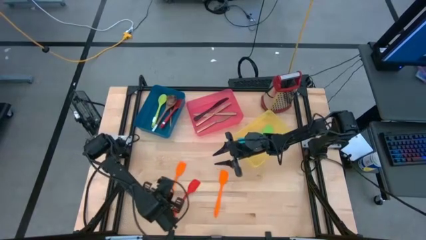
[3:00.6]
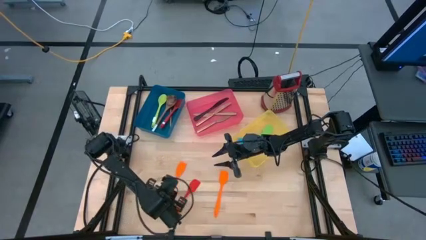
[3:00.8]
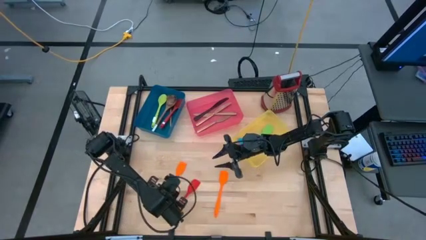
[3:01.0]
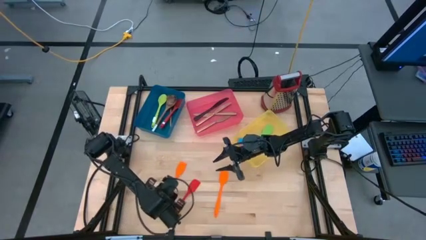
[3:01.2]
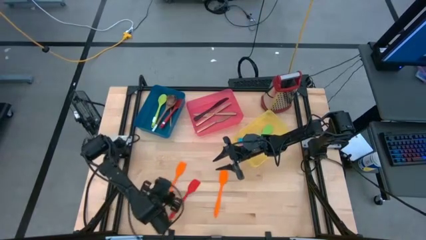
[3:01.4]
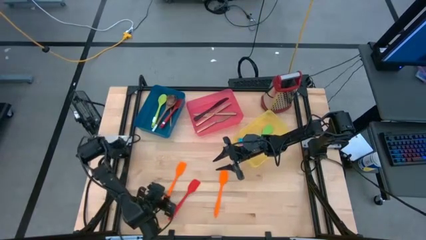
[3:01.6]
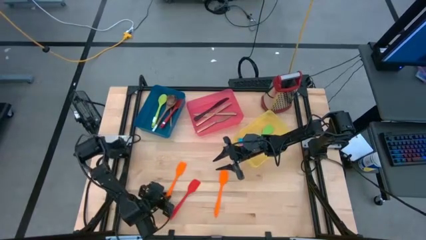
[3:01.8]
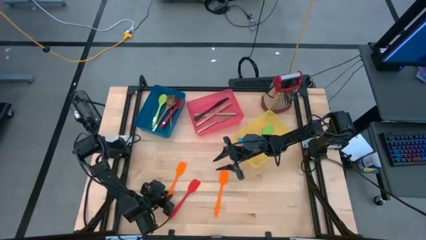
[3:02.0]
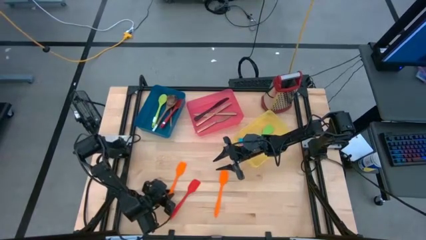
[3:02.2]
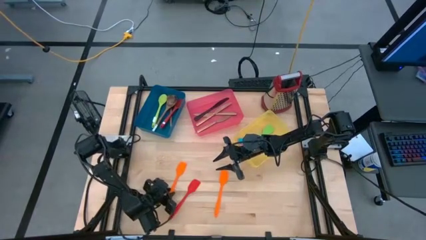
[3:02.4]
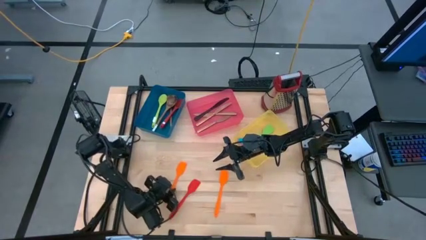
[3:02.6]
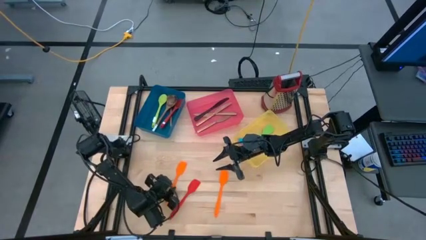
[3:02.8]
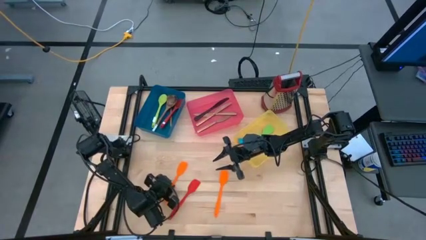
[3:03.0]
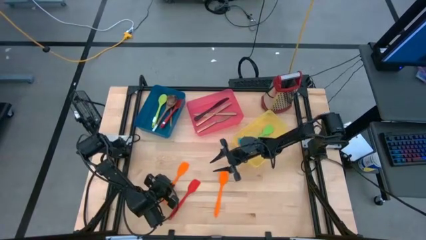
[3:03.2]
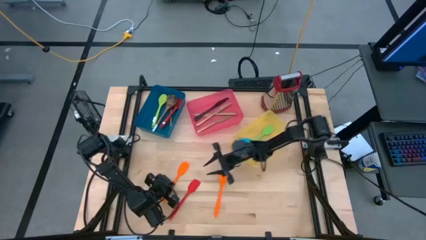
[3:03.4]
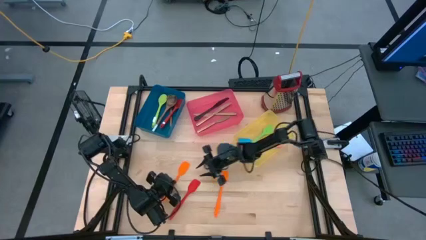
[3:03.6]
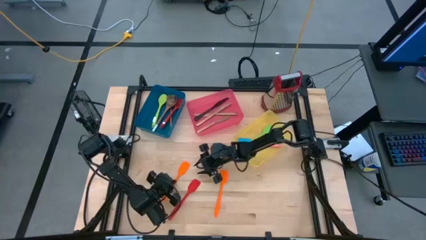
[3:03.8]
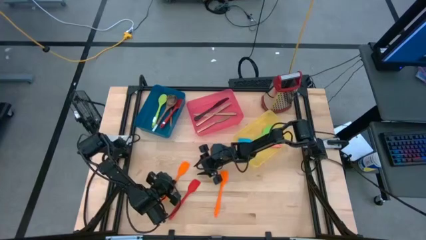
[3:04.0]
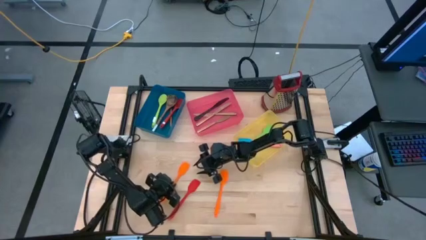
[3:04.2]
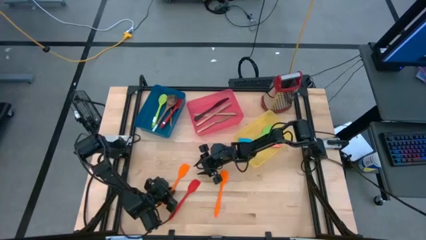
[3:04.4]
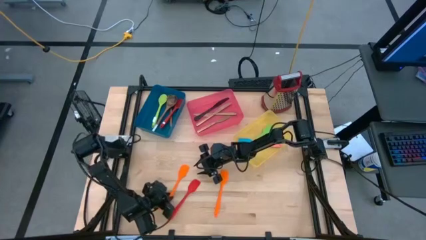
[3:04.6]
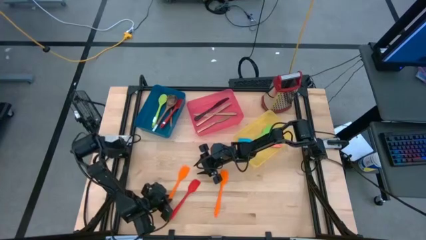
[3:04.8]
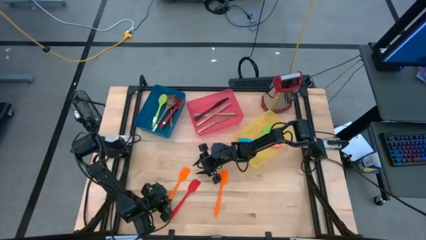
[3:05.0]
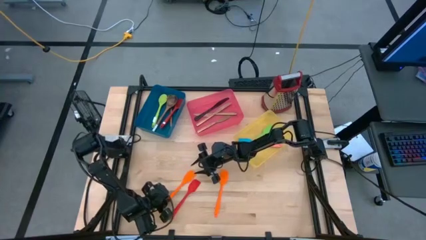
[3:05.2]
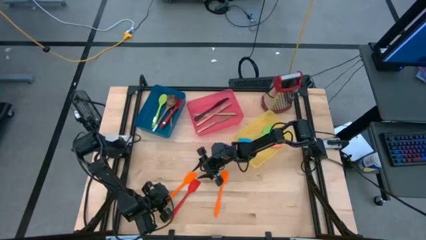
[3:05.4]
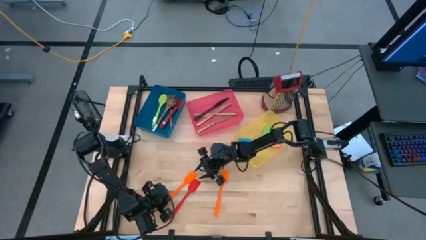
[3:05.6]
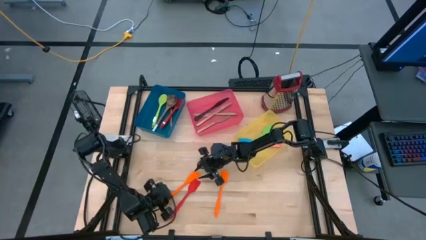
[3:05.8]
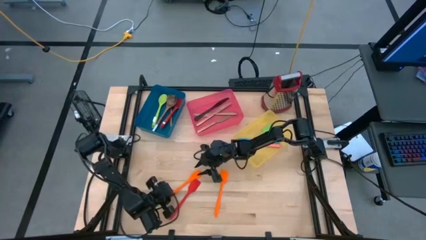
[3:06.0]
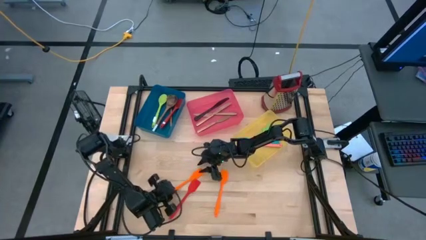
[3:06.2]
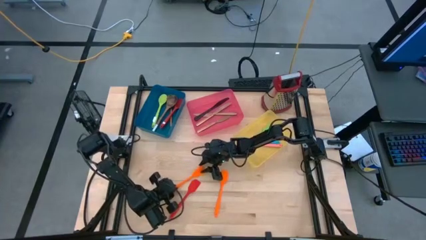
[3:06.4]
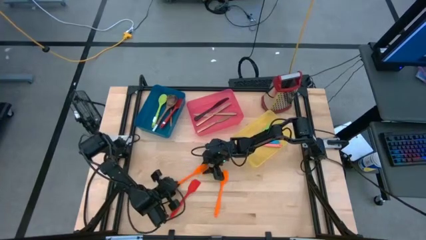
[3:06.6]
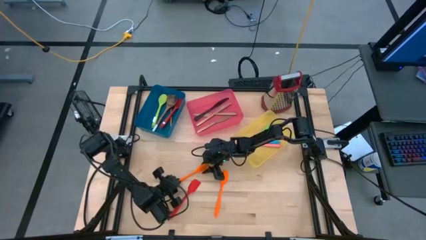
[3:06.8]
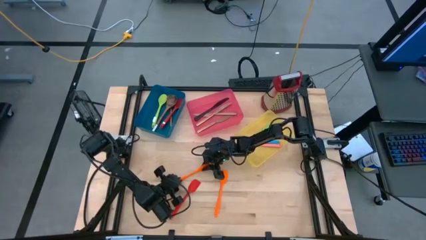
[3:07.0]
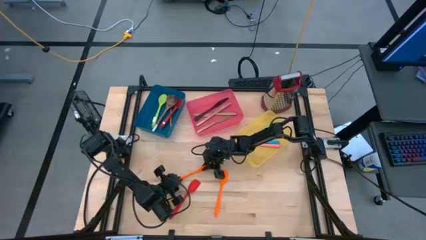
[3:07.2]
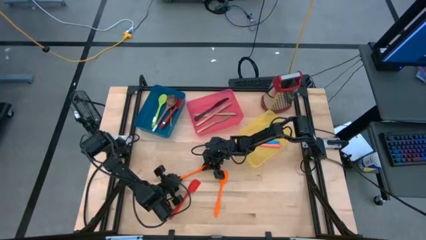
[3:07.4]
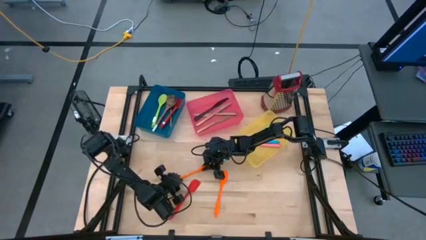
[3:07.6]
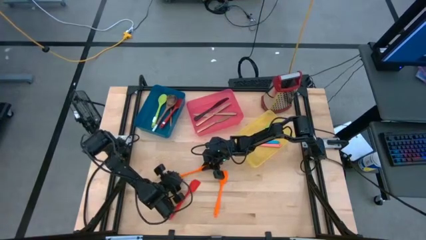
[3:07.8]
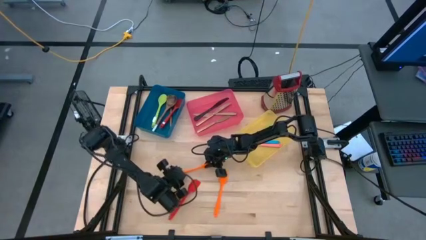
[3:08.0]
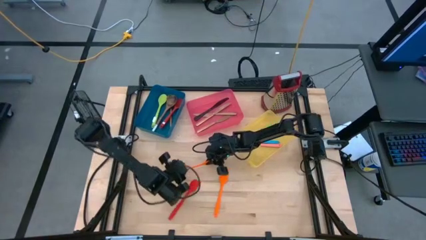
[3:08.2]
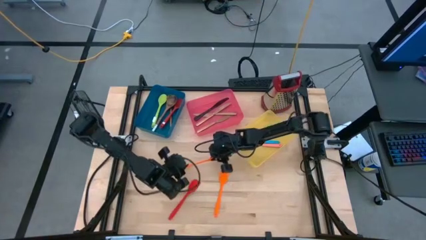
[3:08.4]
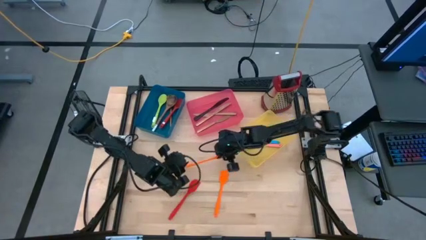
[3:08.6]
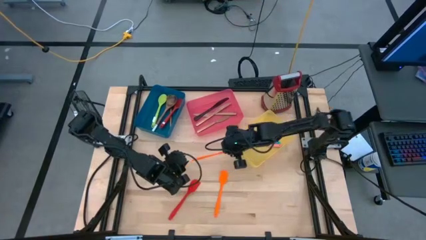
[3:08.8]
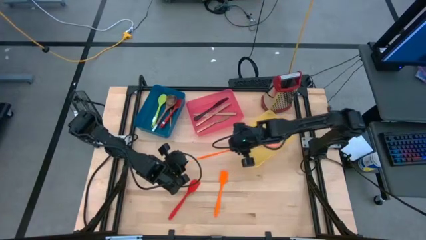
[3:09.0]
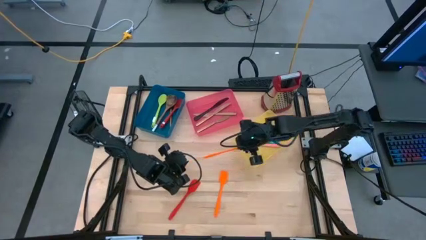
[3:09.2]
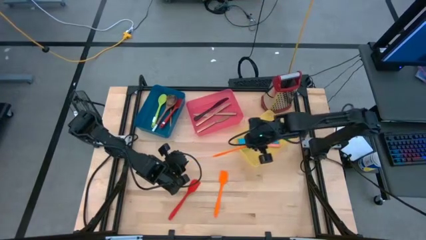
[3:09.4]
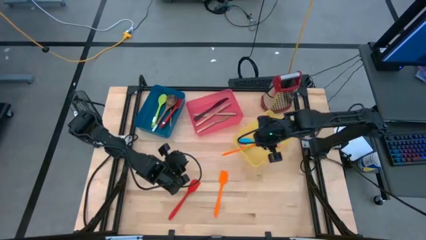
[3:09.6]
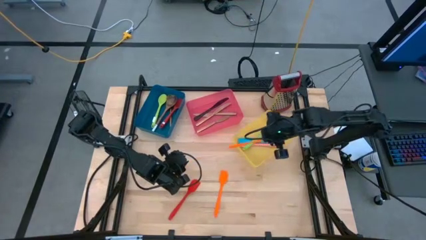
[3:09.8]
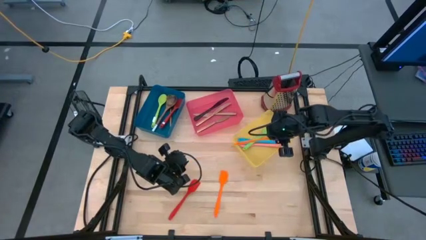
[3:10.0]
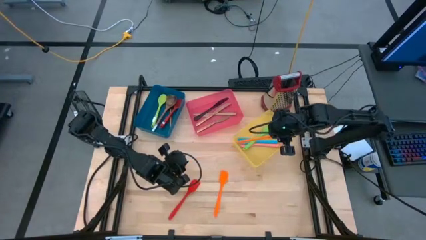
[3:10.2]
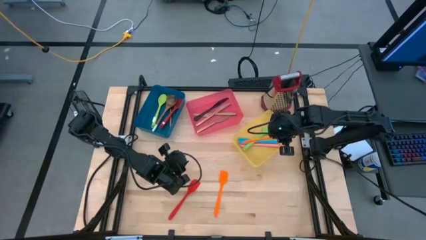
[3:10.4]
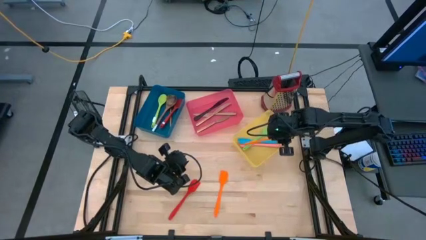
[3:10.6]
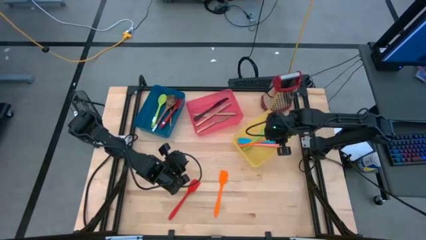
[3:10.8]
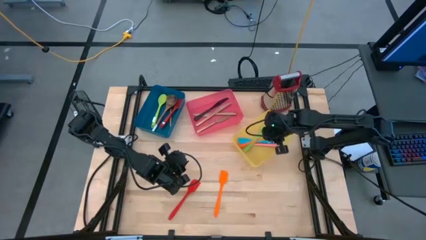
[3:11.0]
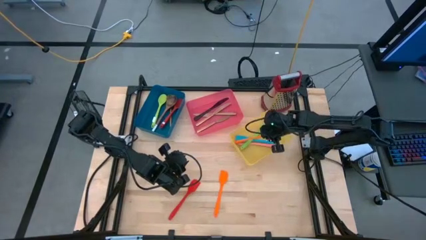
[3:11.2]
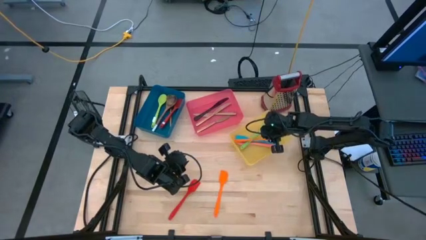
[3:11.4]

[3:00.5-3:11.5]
Task: Pick & Place Kitchen Items
Put the left orange spatula into the yellow bin

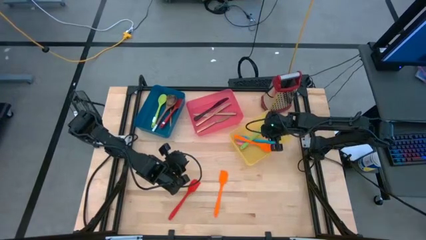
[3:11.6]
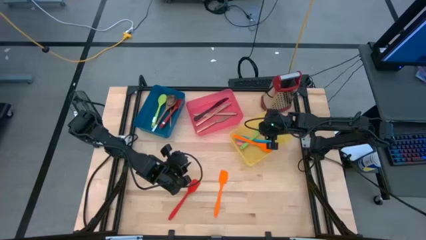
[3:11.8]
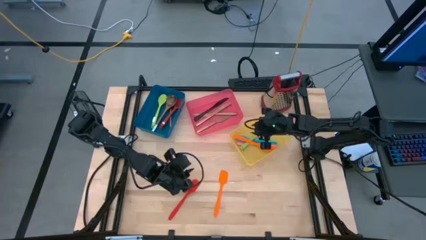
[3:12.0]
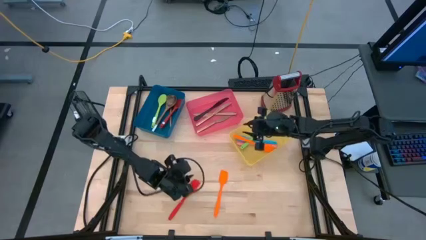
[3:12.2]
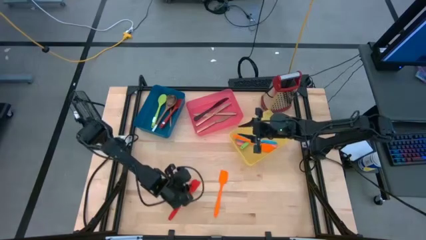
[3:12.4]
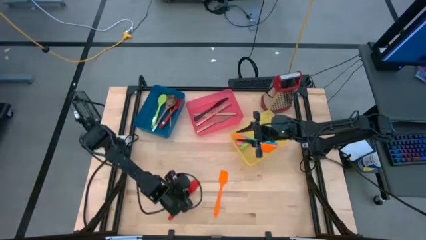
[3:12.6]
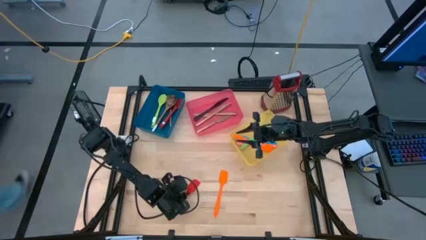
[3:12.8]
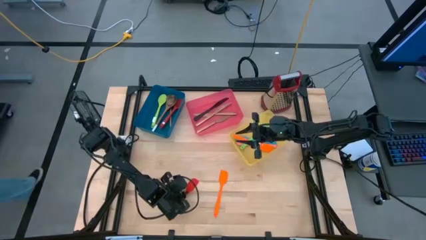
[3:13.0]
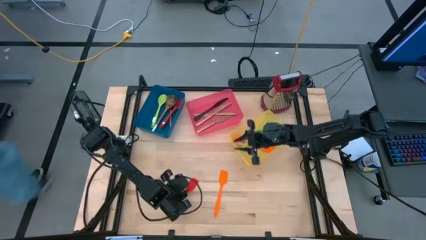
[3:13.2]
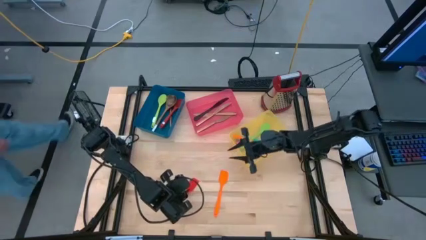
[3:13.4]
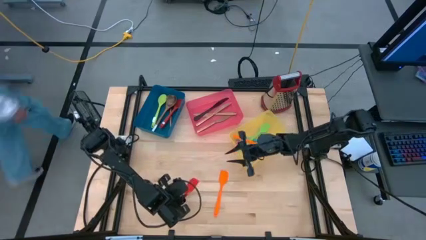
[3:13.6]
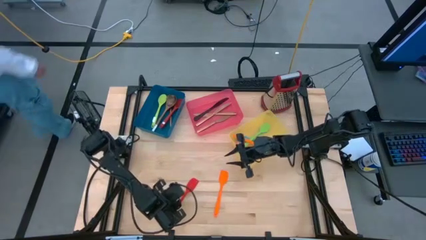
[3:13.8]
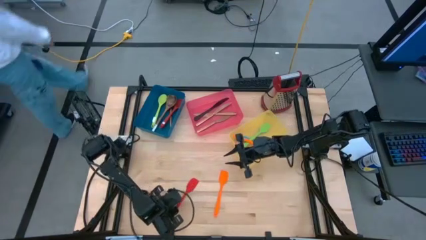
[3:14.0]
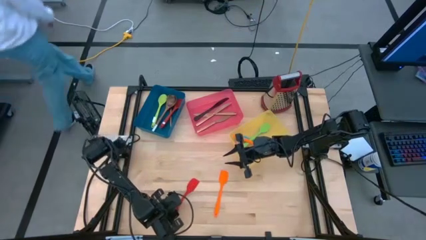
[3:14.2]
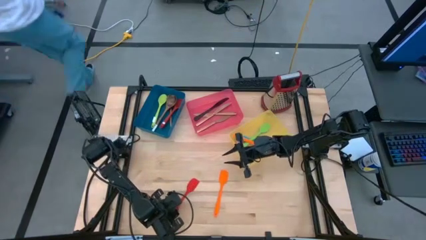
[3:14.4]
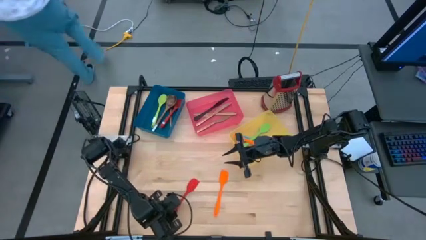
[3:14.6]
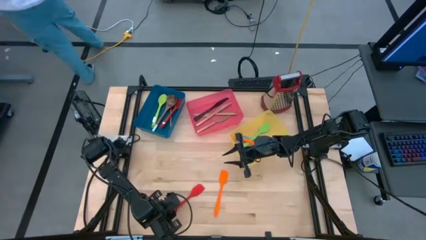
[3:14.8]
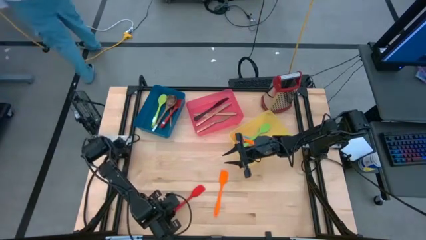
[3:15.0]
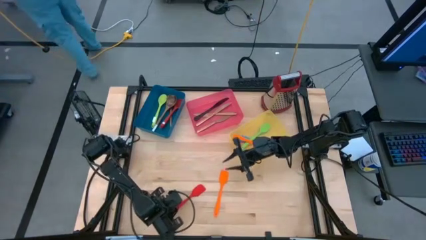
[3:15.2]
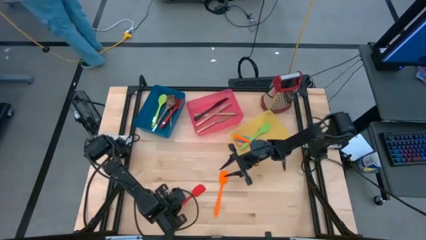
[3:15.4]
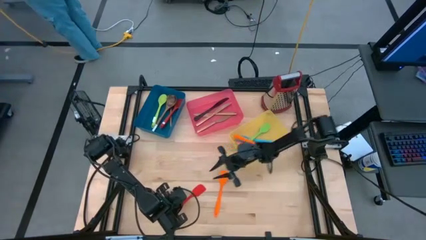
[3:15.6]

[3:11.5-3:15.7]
Put the red spatula into the yellow bin

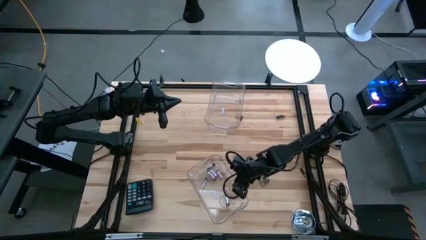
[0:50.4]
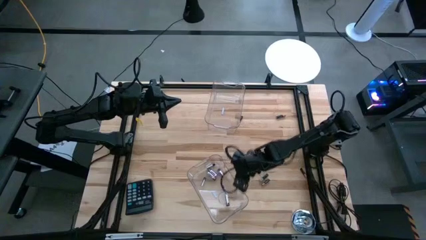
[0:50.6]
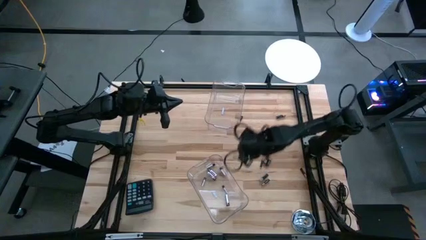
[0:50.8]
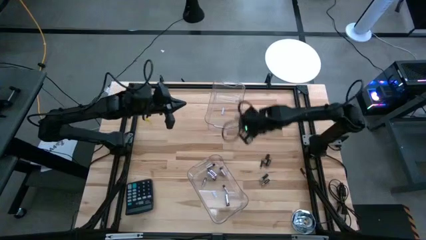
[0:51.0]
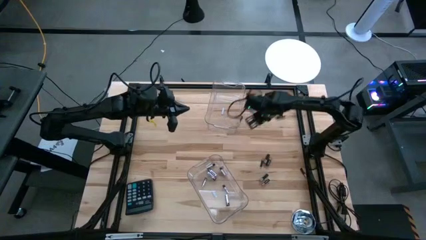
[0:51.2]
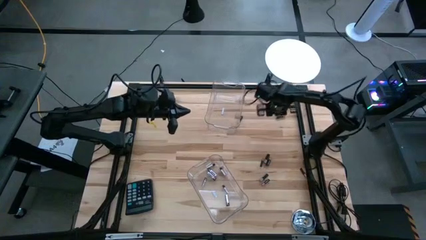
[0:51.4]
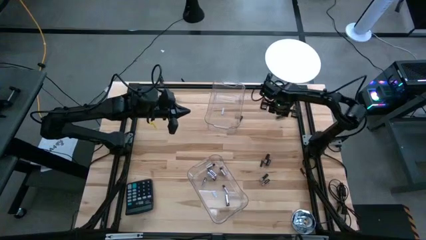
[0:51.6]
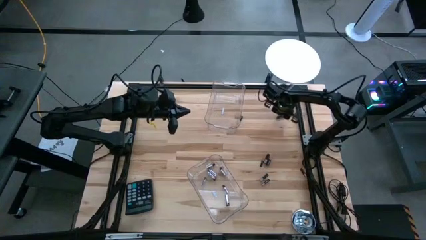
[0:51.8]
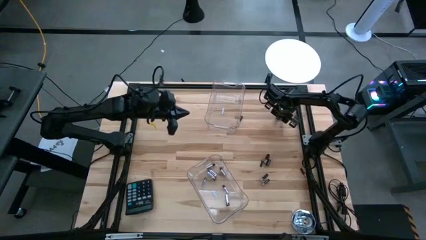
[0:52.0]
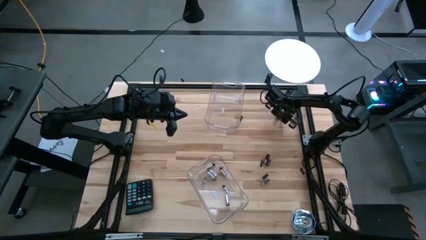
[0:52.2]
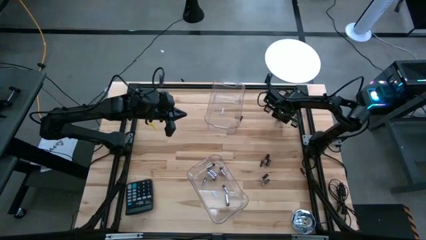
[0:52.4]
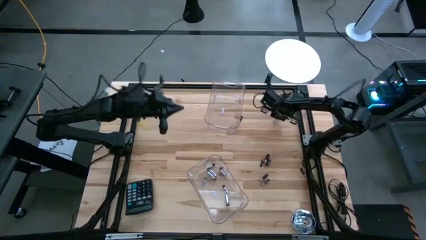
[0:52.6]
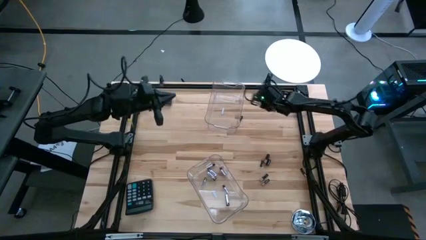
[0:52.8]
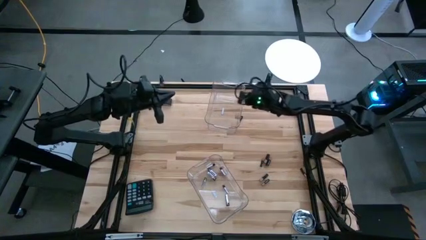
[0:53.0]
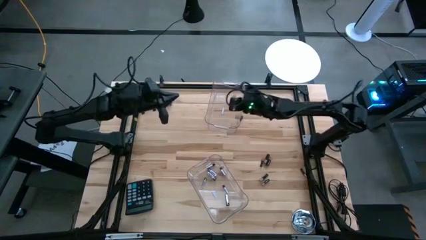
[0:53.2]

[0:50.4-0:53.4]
Task: Sort batteries
Put the black battery into the top transparent bin
